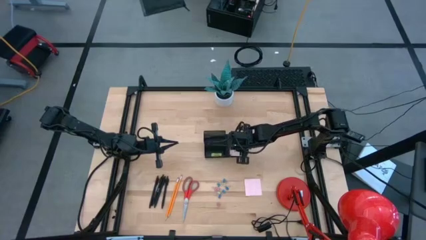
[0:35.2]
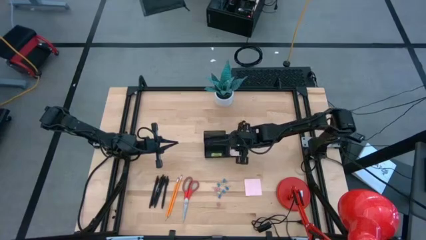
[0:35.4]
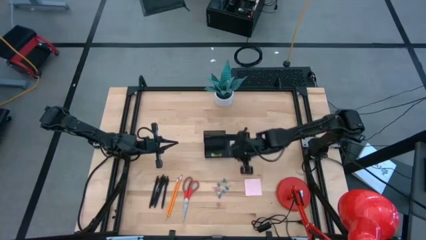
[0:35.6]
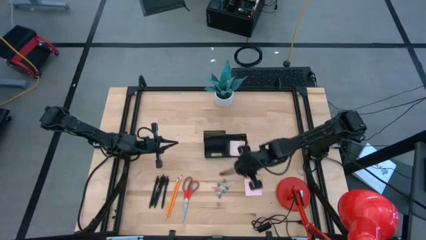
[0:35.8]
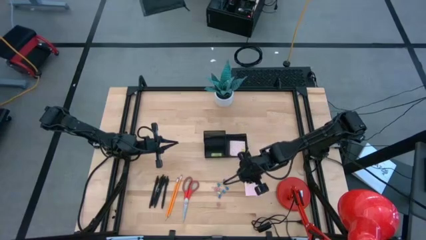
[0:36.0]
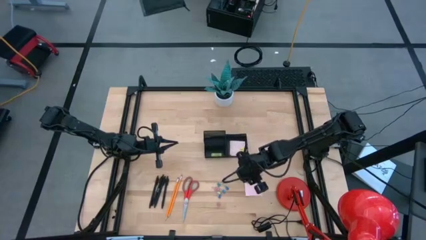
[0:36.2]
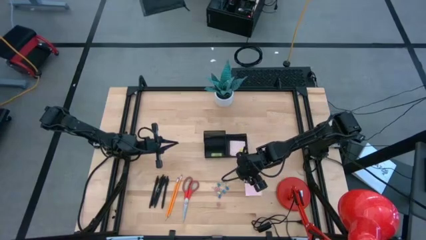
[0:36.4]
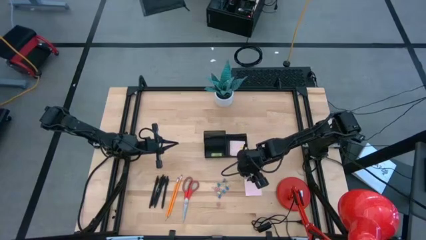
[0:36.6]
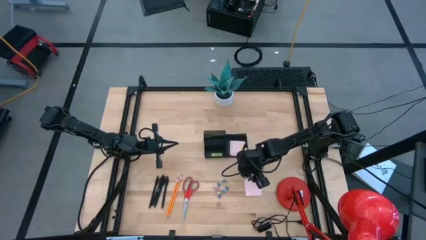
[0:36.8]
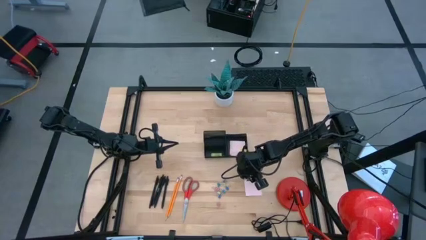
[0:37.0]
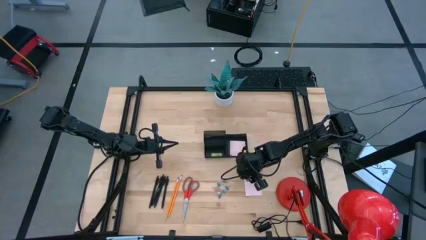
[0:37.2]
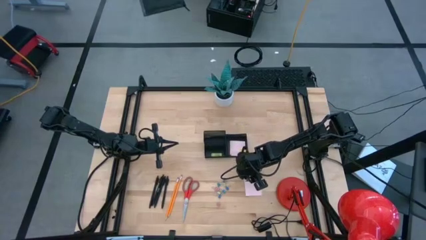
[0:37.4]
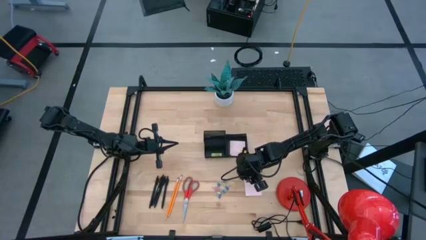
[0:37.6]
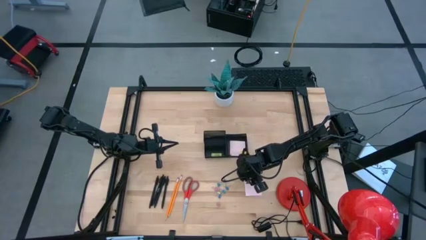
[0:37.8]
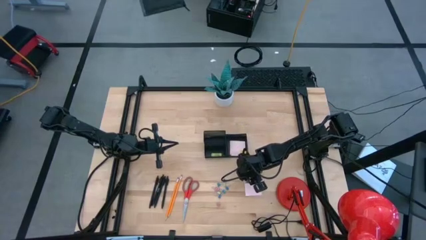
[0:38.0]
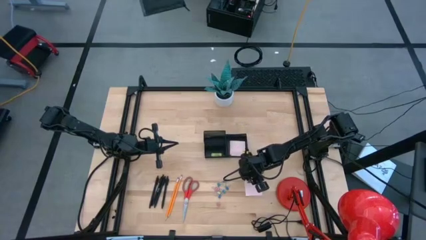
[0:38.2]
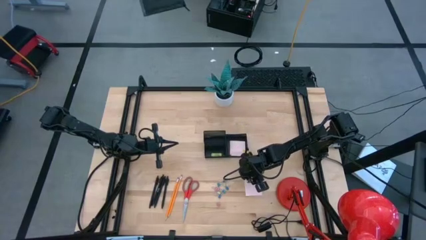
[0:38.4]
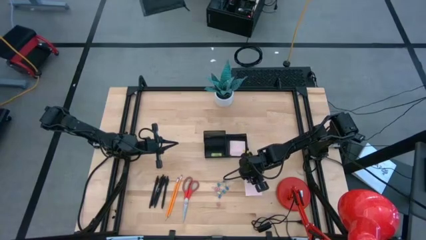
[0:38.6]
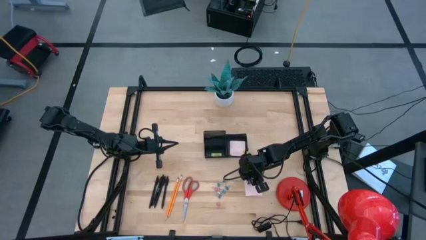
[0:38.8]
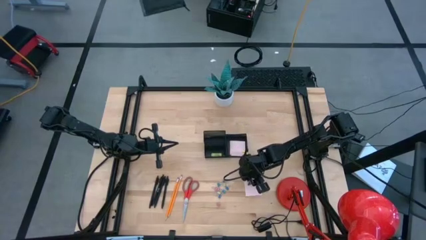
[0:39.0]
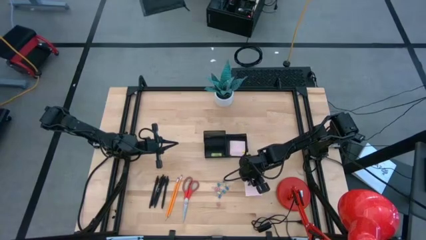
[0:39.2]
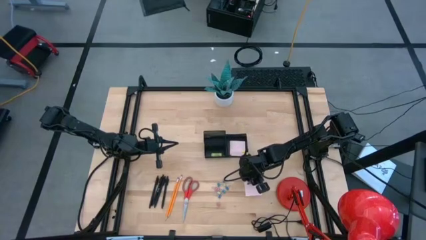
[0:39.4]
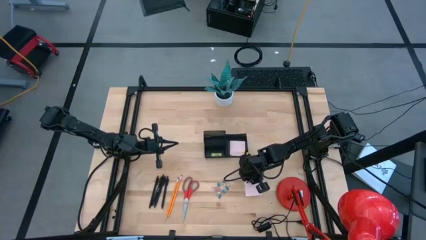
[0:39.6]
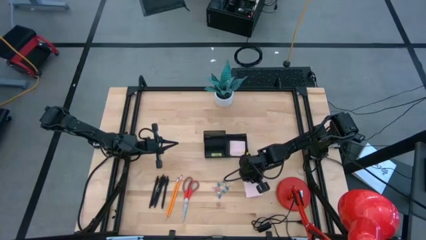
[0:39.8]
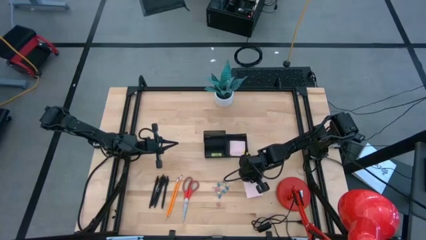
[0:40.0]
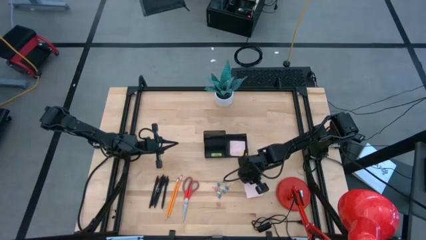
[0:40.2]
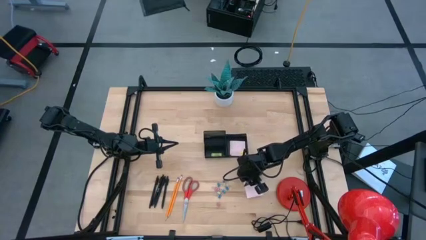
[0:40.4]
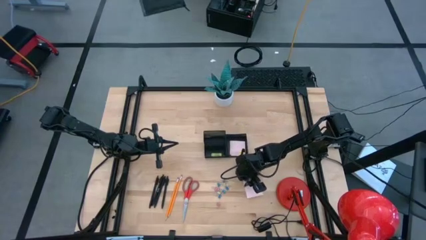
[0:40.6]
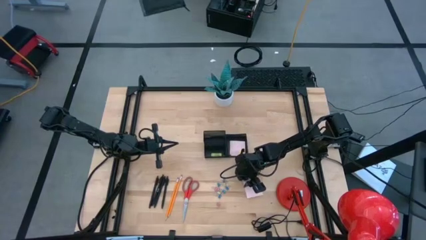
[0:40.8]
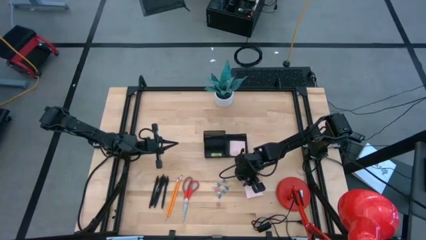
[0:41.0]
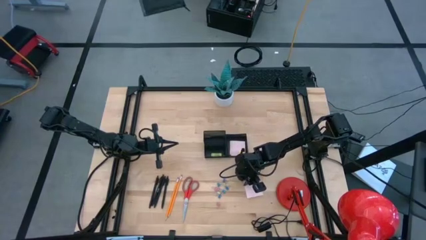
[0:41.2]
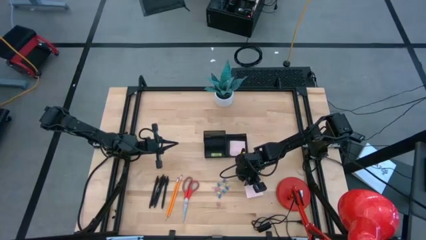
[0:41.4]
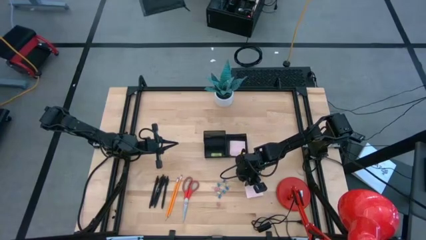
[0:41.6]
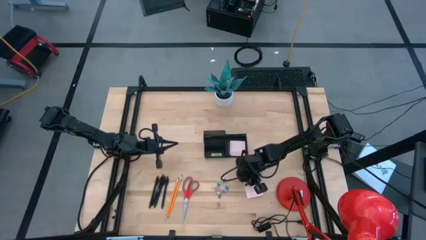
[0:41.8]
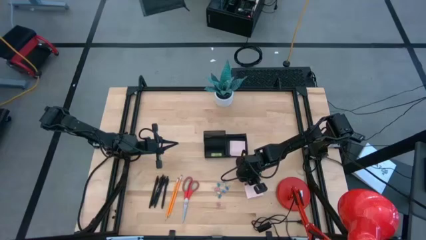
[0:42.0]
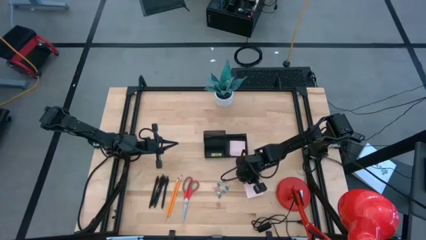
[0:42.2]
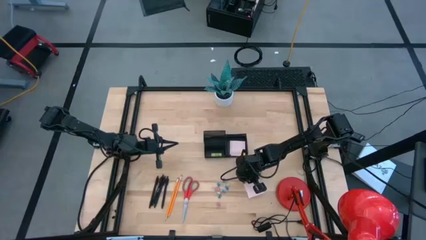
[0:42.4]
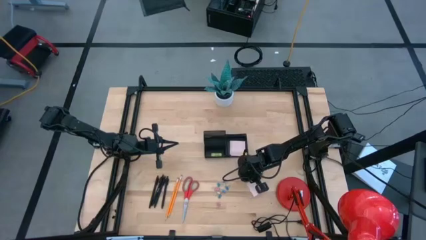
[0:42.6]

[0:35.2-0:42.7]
Task: Pick and place office supplies into organizer
Put the pink sticky notes into the desk organizer

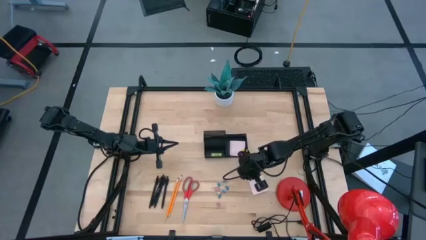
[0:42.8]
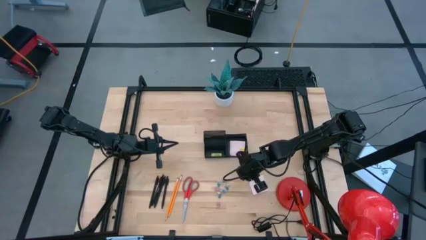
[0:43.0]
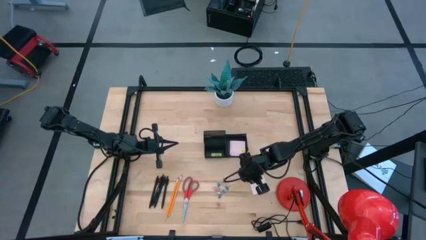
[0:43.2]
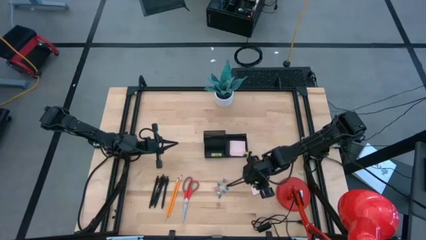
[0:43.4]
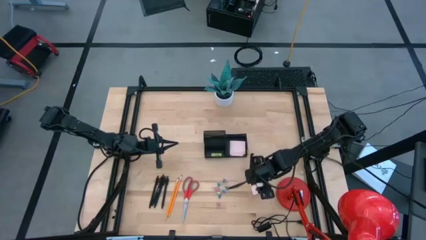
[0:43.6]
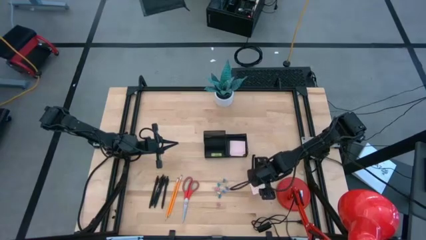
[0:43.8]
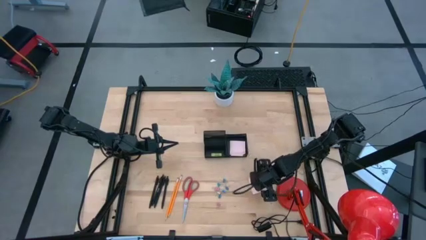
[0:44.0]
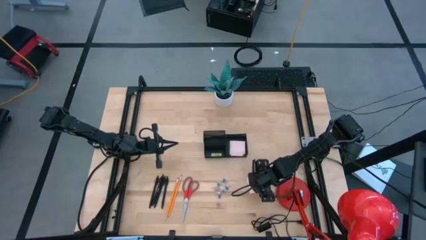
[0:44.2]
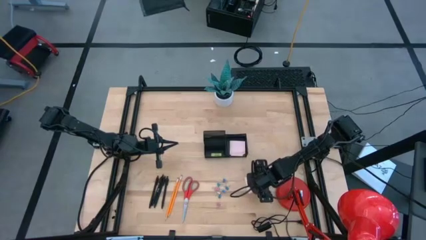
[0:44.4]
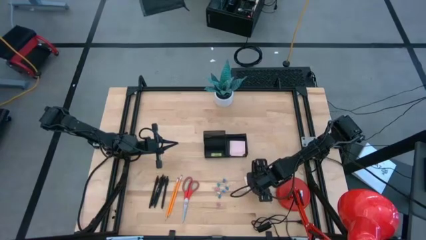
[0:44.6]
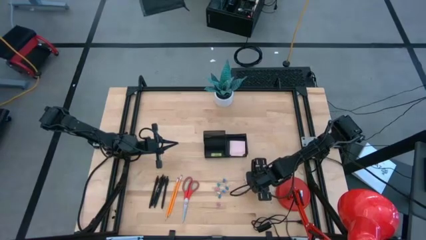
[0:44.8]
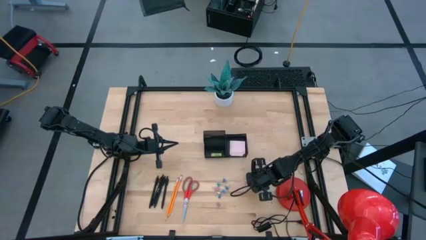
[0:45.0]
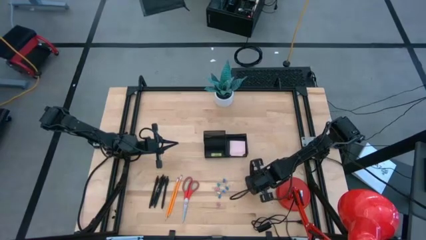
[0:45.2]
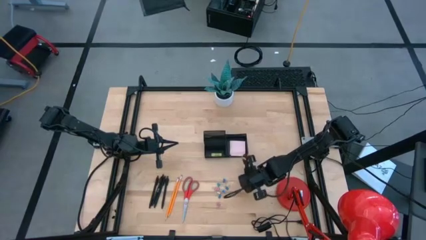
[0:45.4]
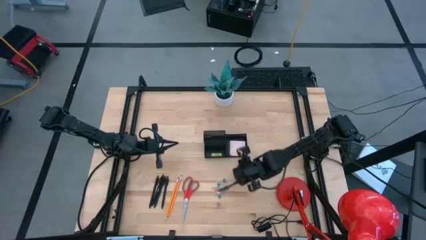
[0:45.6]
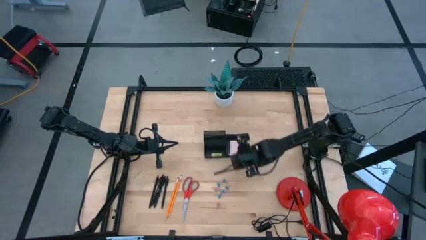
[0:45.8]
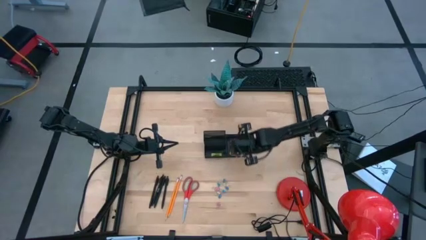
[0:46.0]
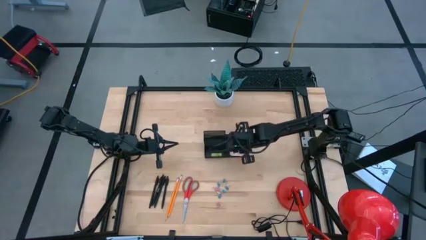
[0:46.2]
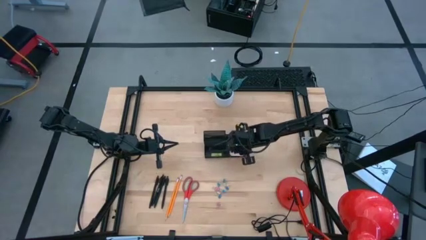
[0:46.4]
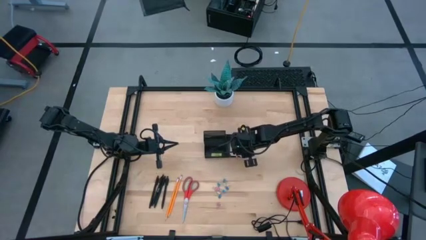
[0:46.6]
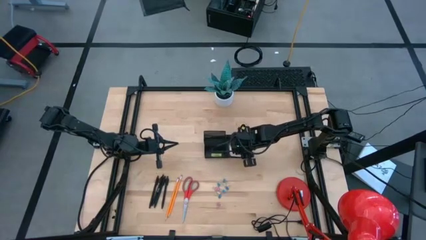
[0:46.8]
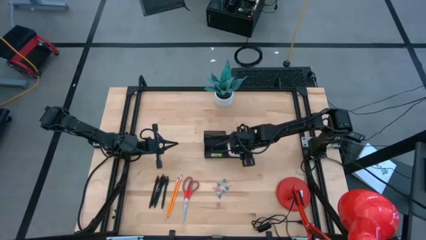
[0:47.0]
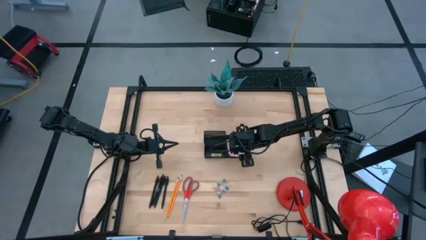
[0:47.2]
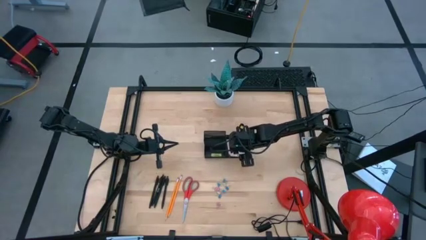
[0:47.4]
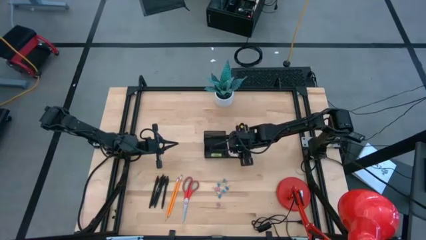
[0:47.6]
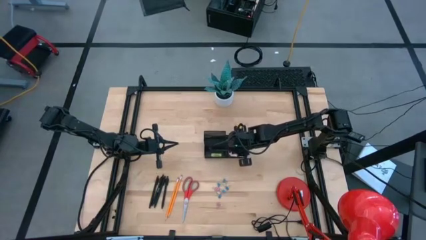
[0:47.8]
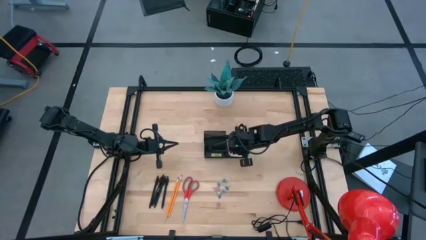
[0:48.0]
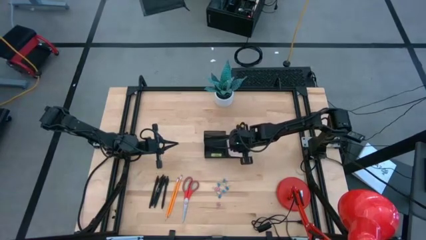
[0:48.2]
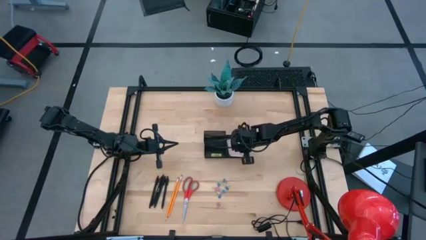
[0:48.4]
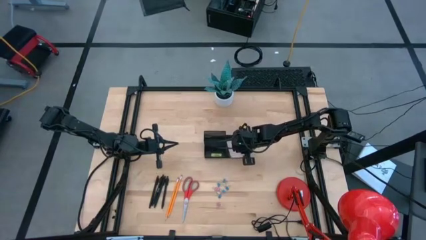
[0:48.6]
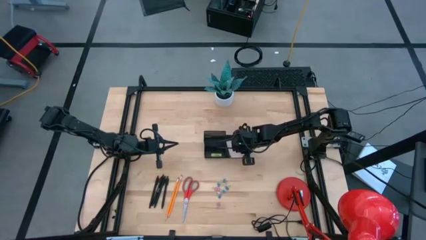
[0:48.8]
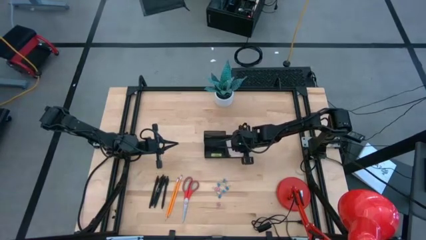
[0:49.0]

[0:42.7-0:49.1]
Put the pink sticky notes into the desk organizer

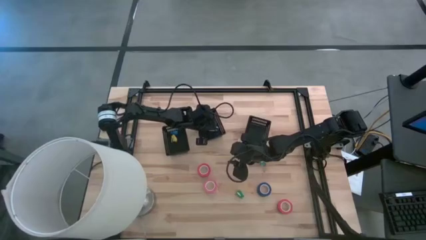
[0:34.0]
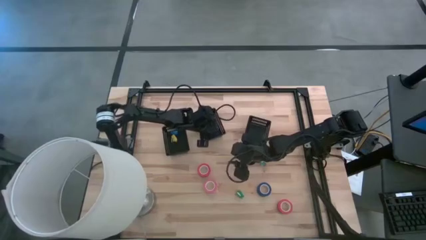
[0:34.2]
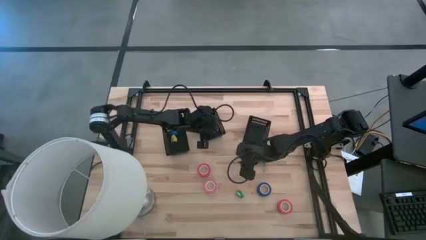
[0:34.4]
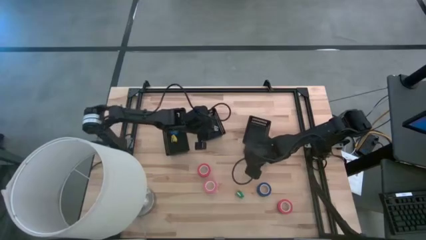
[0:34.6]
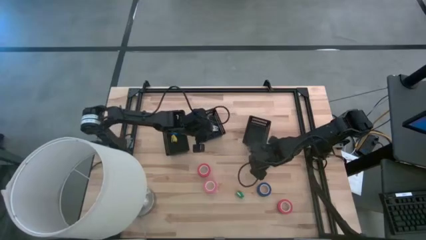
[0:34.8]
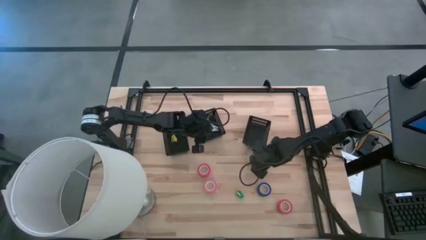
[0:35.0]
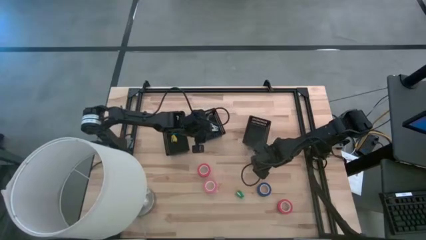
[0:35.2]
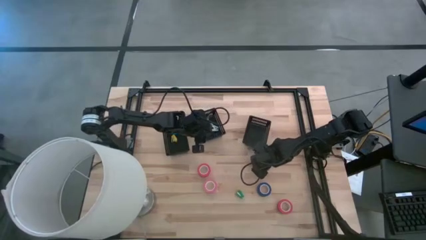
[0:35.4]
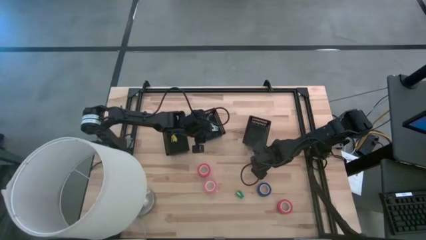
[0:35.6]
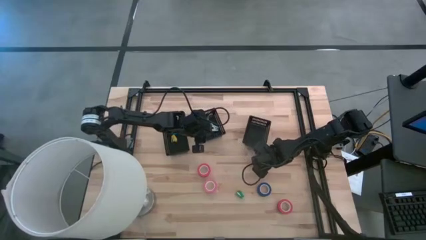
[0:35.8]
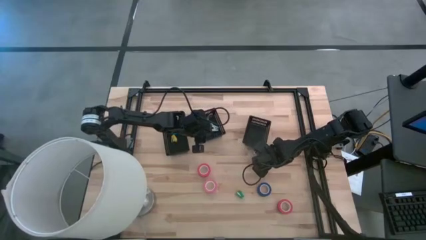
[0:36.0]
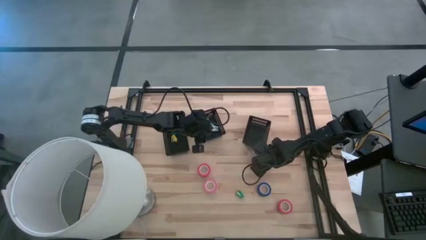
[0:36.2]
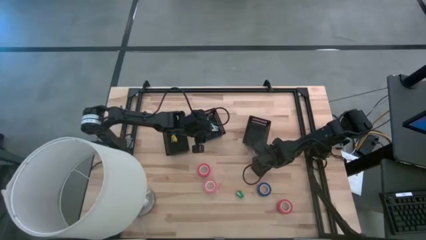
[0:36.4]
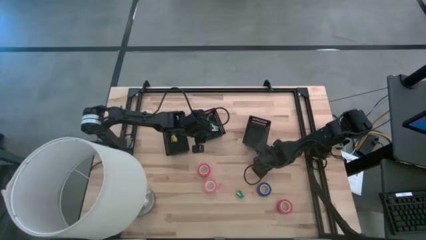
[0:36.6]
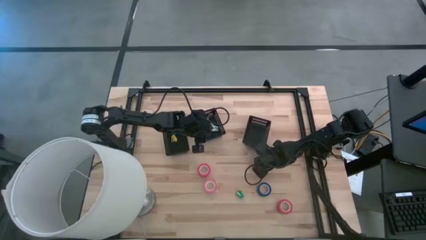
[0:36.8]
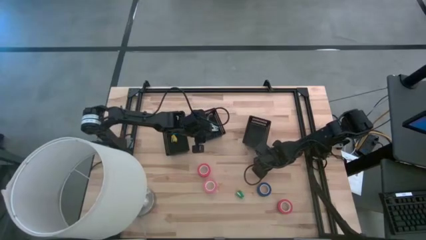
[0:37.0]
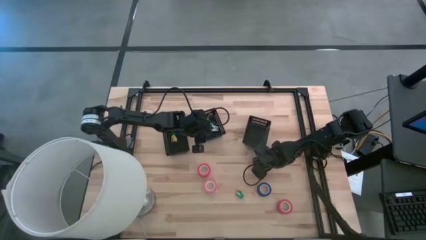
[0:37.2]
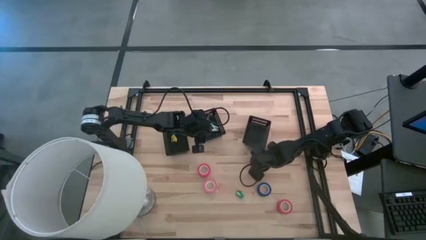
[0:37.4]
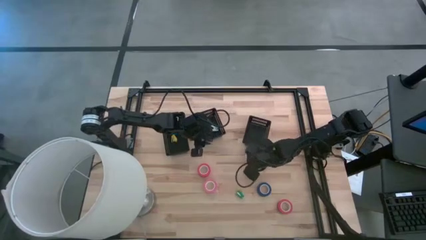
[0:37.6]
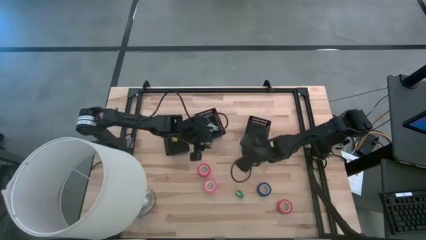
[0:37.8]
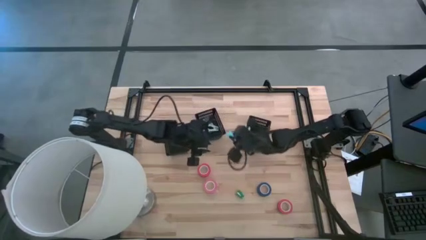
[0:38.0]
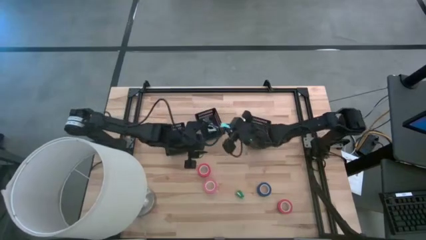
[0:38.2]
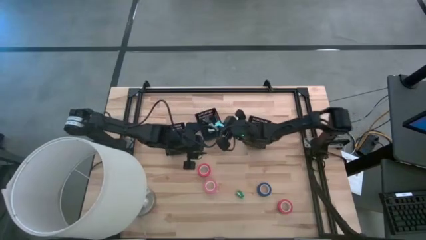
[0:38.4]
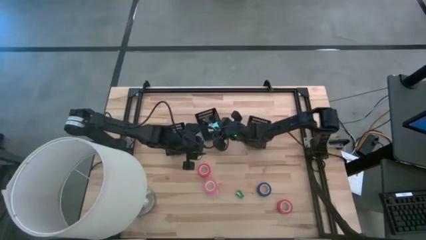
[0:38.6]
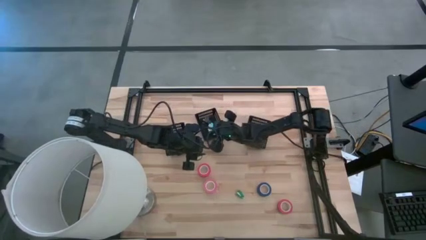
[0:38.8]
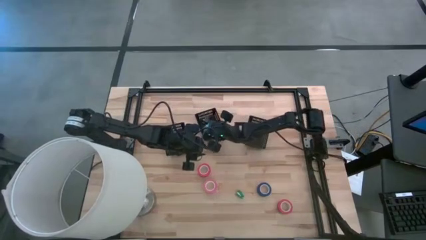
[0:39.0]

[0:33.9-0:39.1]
Task: Pick and place Stapler, Stapler remover, tape
Put the light blue staple remover into the center black bin
